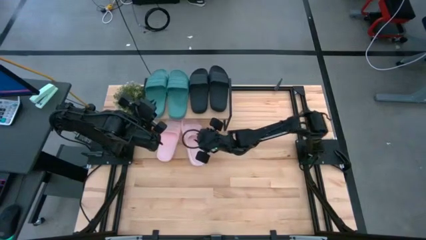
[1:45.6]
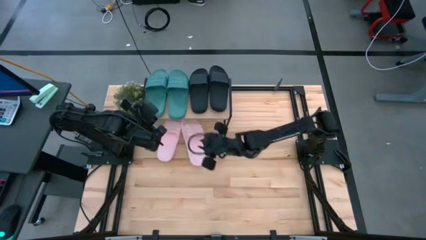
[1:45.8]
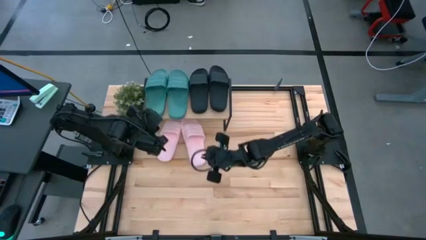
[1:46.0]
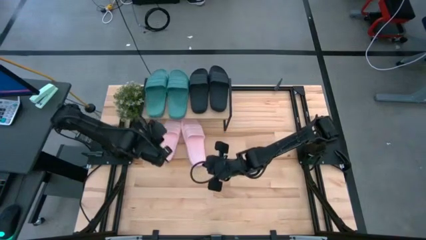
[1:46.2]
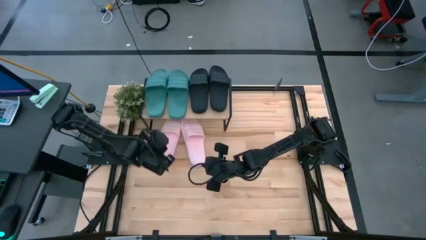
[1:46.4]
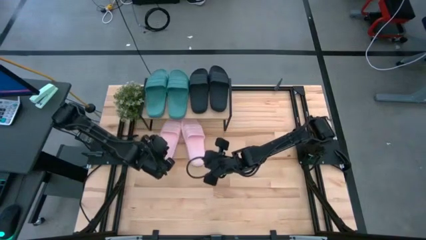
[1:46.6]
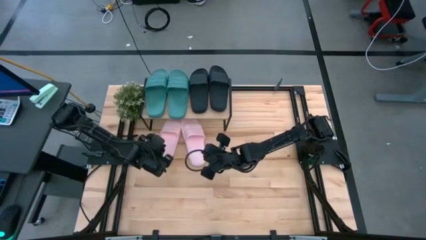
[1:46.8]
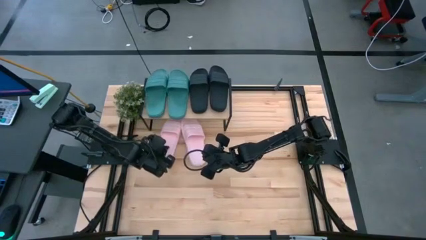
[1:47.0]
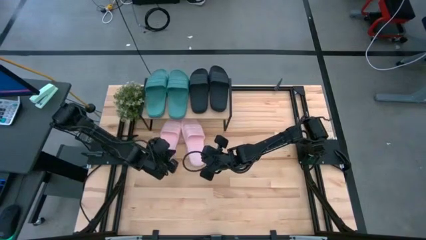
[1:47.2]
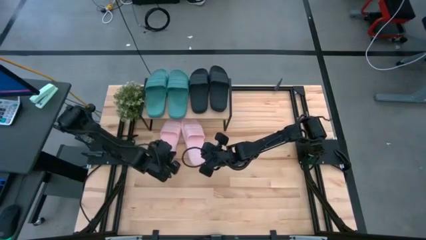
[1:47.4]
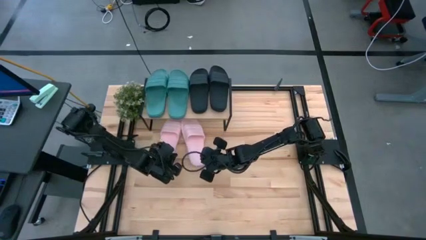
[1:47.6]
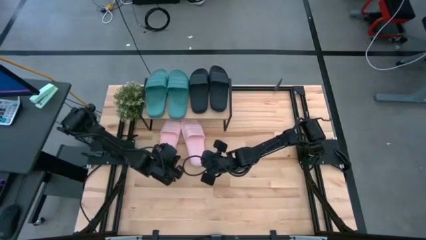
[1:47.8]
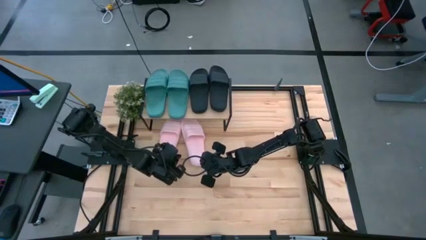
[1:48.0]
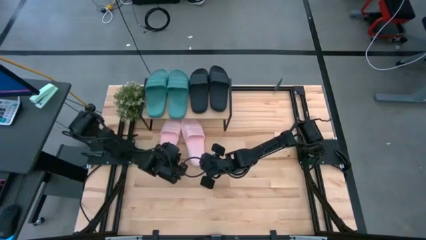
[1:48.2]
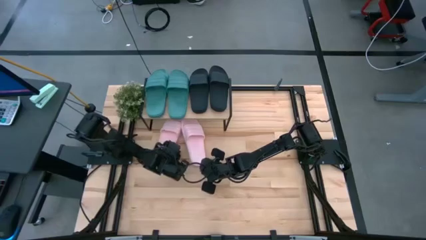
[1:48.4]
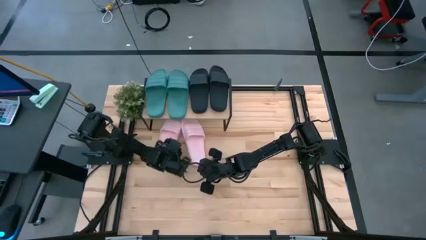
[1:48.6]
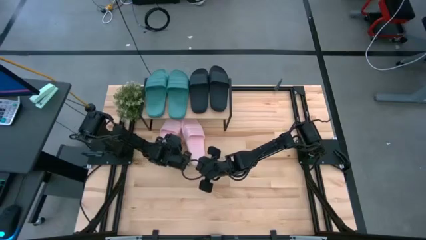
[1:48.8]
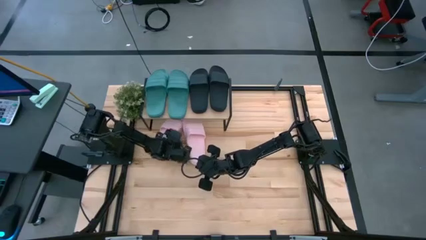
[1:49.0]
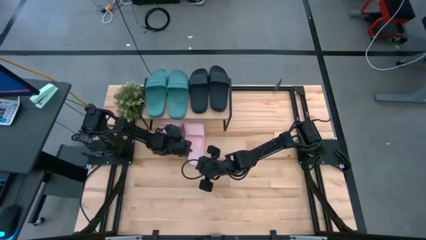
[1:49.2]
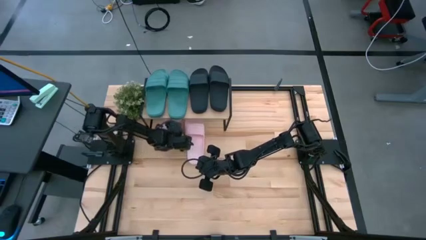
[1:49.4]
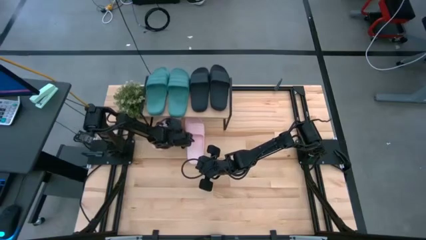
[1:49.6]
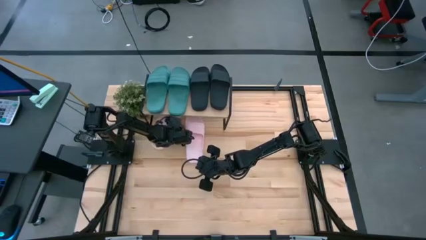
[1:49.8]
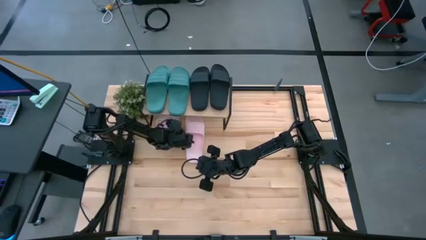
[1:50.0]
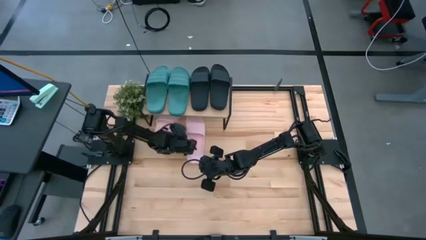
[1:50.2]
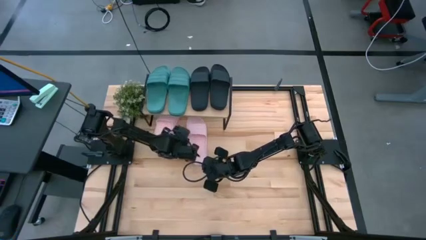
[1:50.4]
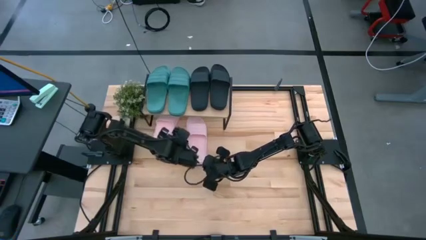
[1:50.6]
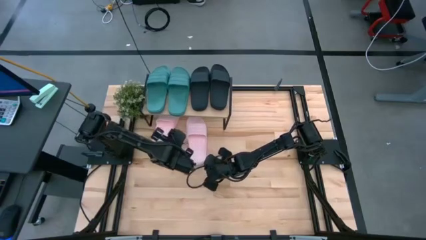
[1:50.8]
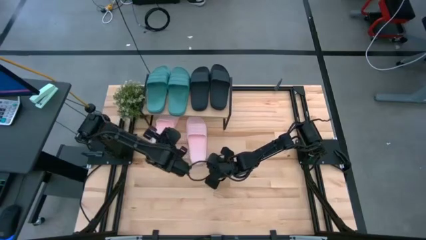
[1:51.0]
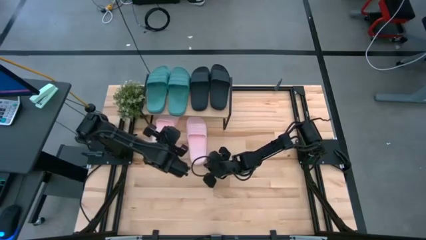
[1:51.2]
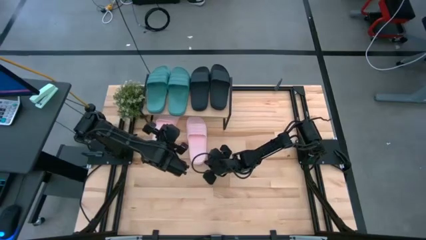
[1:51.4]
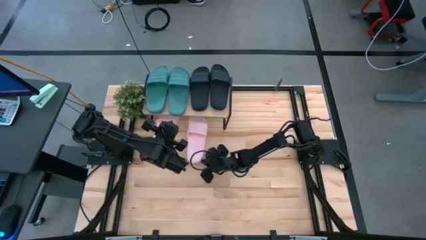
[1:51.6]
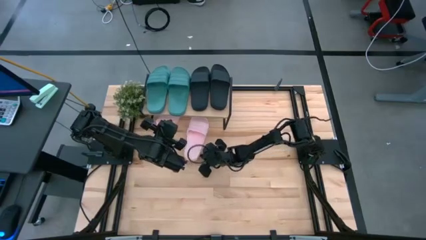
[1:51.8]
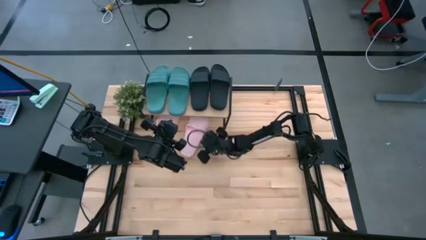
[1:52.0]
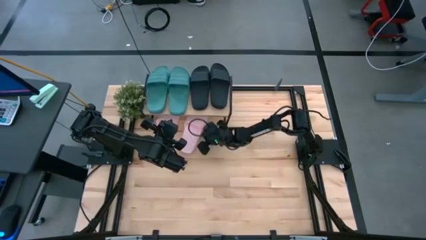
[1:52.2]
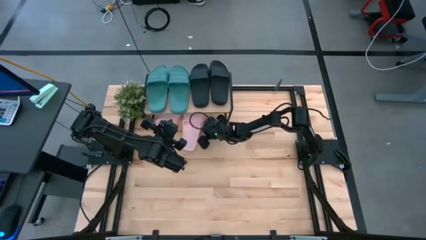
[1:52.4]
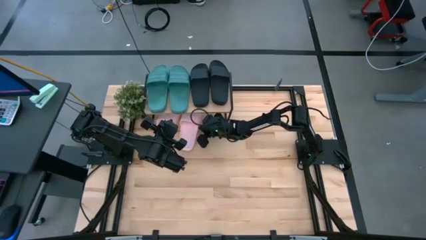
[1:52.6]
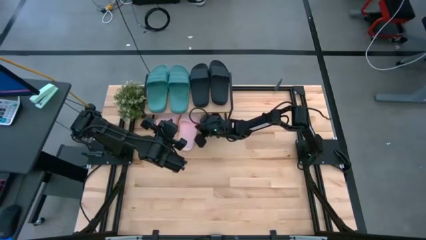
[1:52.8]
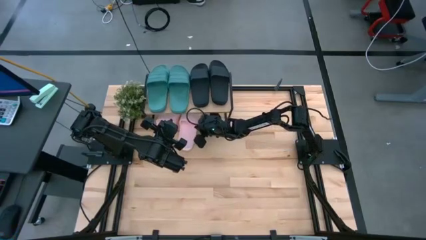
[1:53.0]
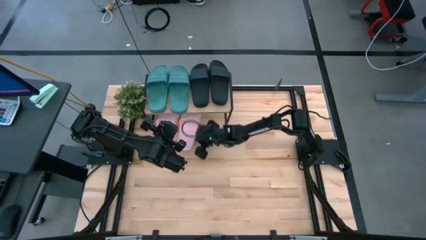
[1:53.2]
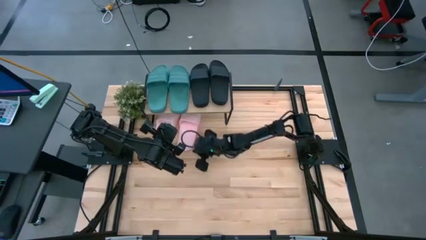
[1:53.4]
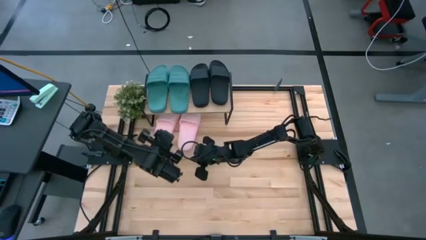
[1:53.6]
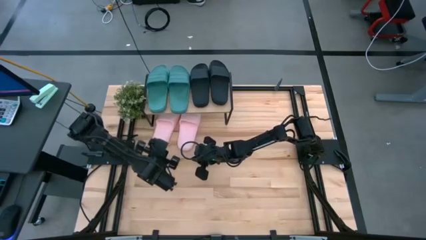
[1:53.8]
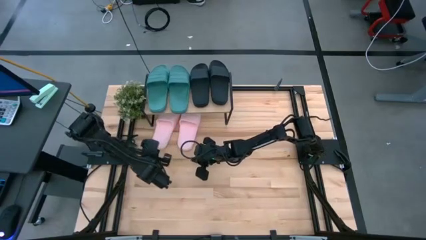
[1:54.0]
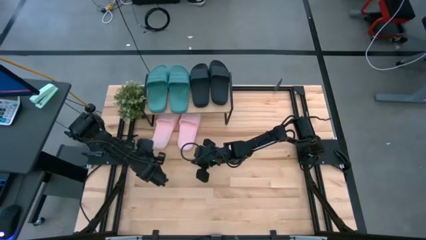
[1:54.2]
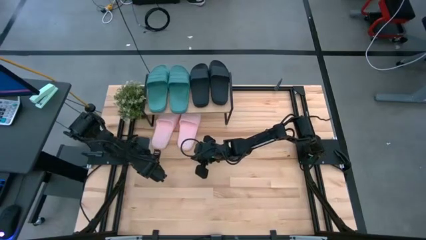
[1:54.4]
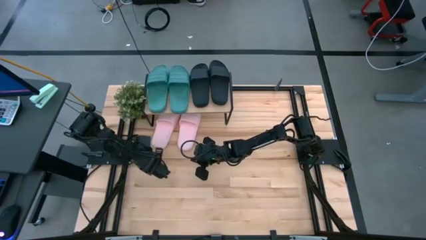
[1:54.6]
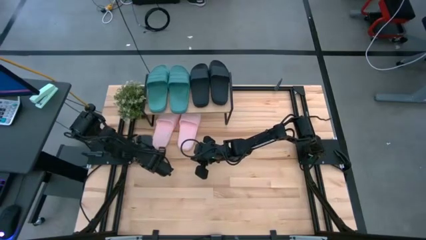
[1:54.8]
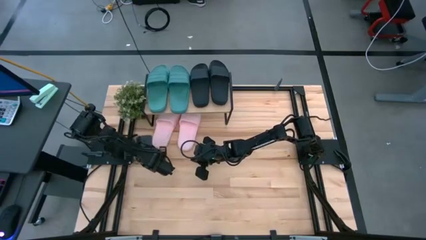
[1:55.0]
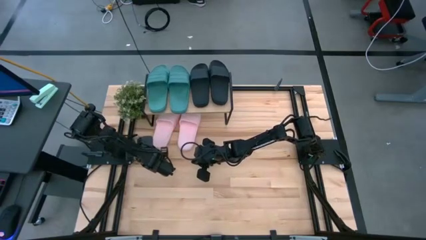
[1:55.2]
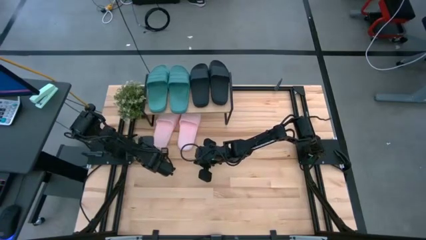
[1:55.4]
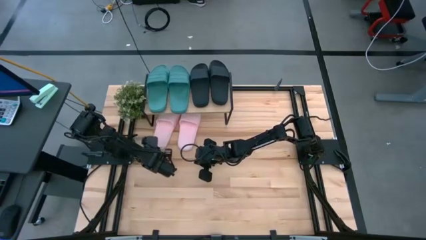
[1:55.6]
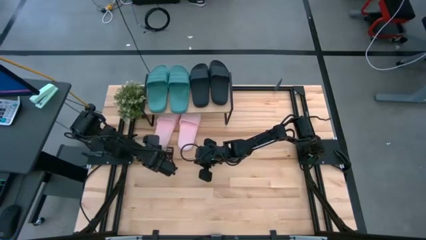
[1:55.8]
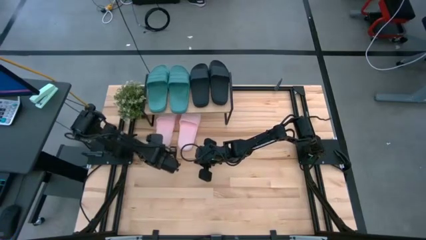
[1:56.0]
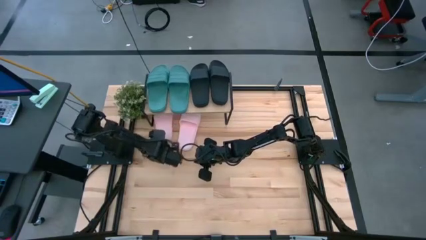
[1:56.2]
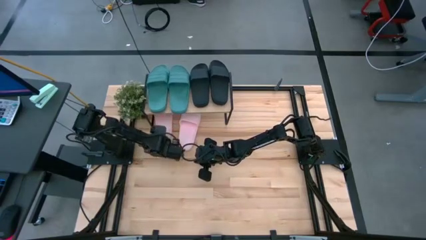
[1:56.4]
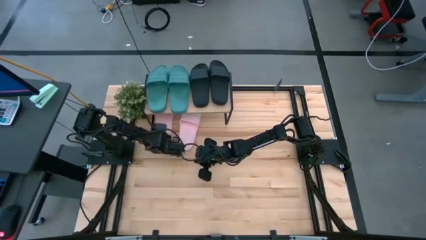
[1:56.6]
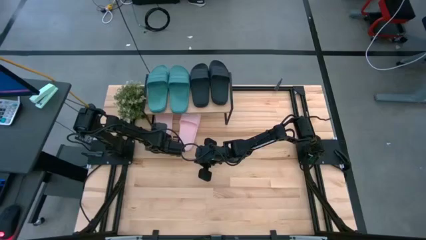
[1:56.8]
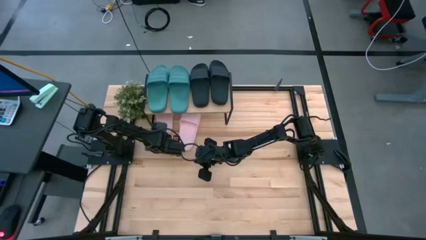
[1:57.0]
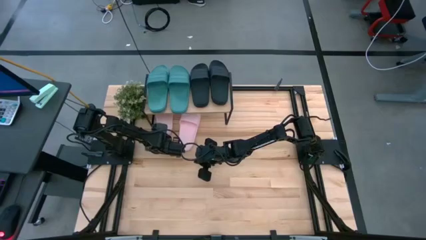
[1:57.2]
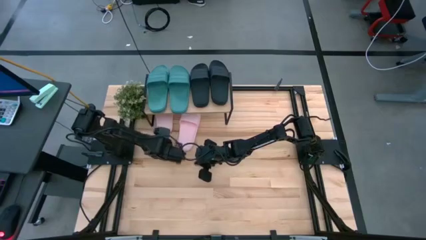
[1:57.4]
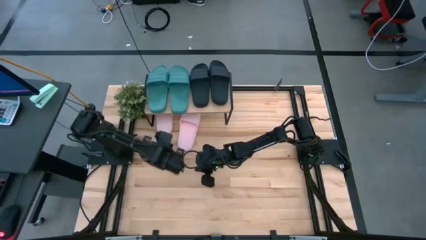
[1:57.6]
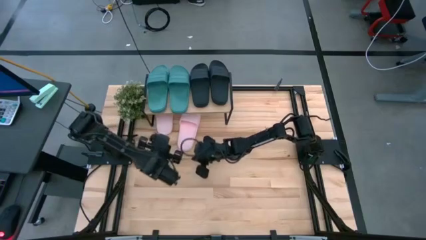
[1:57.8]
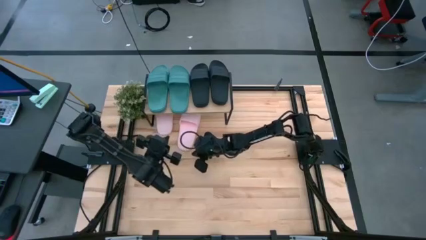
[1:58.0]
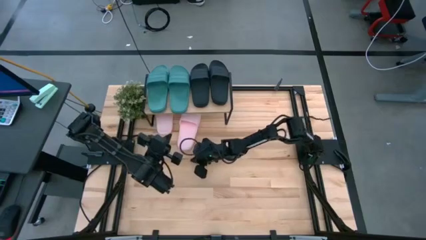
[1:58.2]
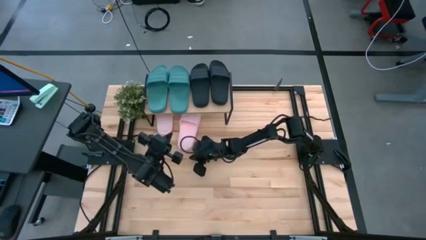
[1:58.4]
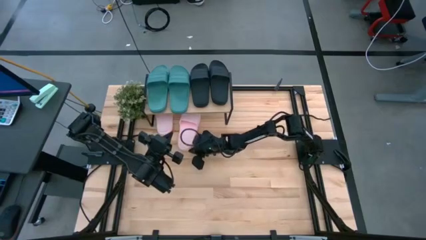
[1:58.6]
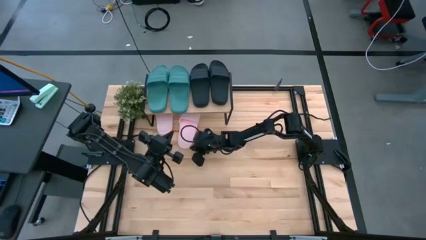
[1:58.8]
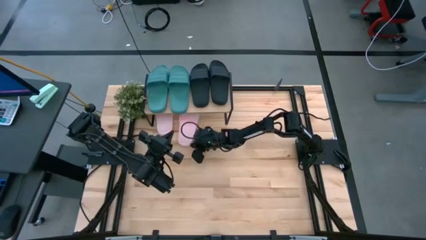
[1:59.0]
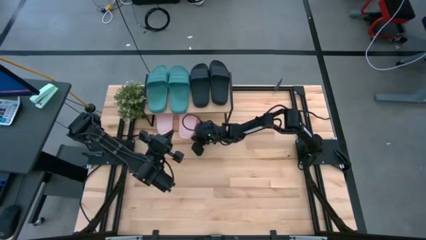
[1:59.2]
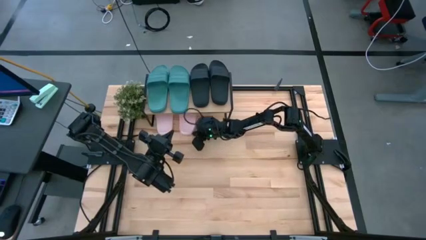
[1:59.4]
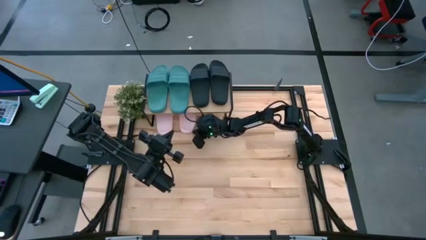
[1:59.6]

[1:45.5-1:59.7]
Task: Pick and place slides into the shelf
Adjust the pink slides under the shelf

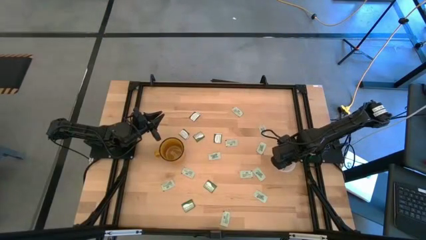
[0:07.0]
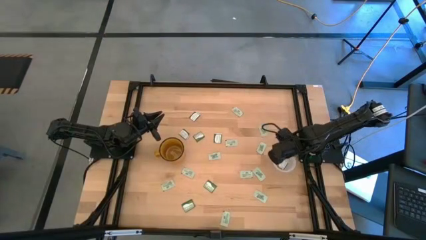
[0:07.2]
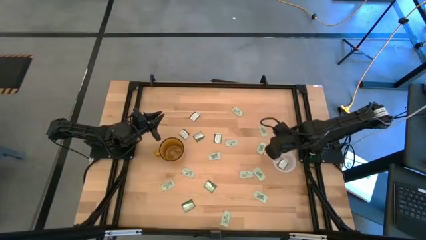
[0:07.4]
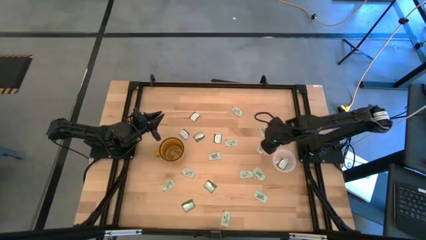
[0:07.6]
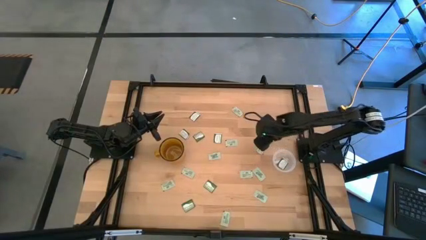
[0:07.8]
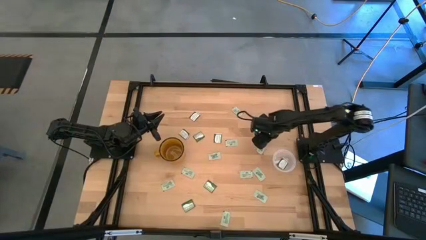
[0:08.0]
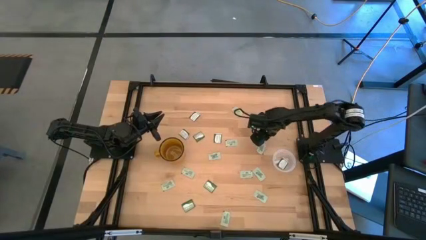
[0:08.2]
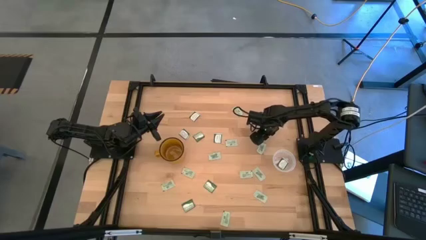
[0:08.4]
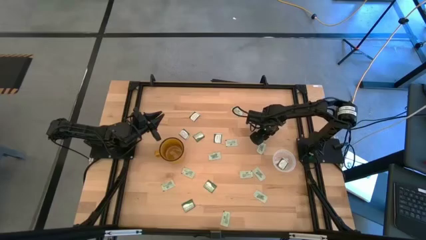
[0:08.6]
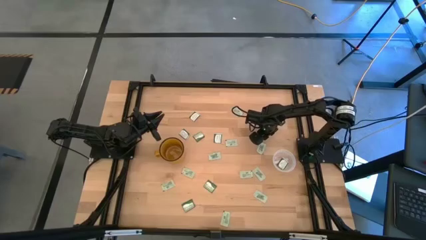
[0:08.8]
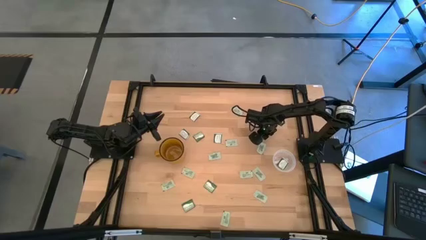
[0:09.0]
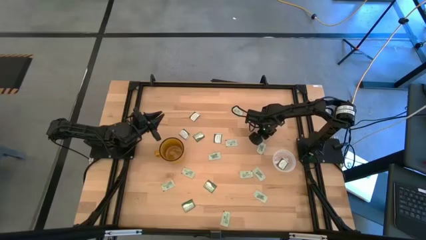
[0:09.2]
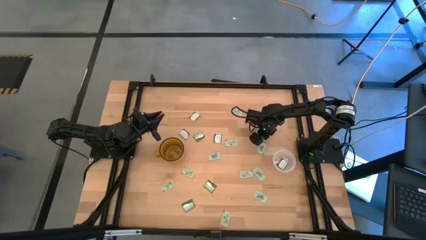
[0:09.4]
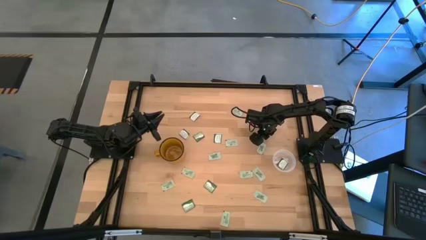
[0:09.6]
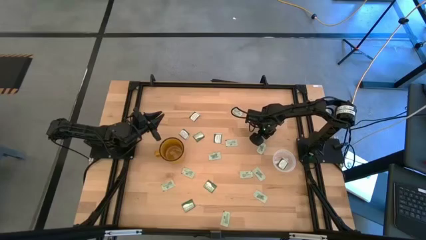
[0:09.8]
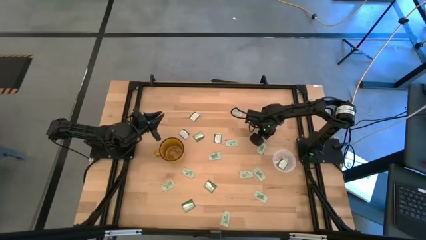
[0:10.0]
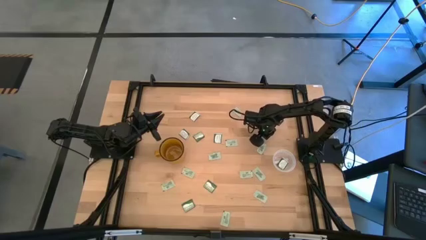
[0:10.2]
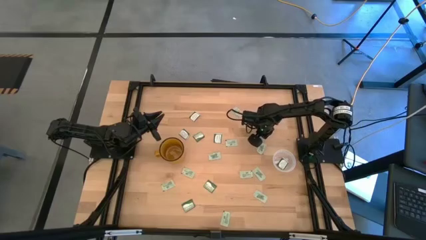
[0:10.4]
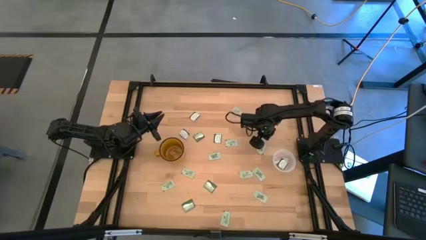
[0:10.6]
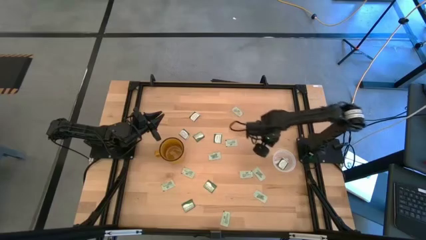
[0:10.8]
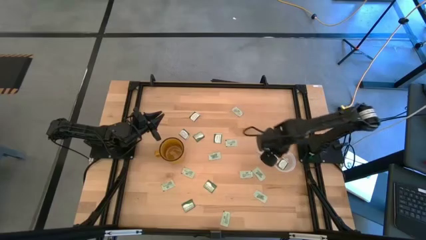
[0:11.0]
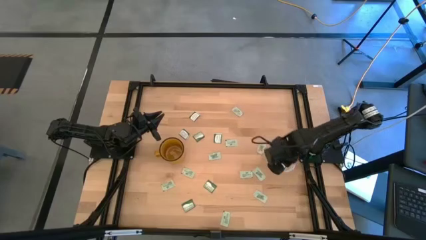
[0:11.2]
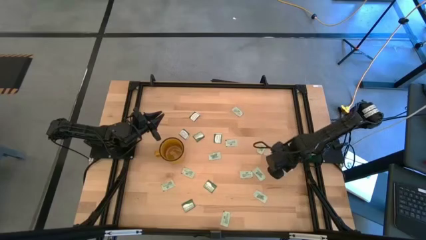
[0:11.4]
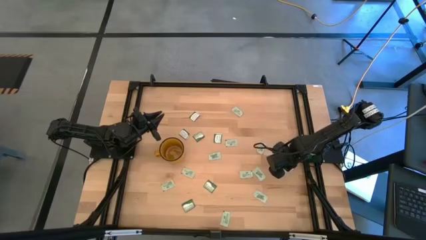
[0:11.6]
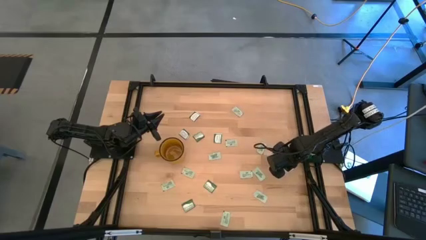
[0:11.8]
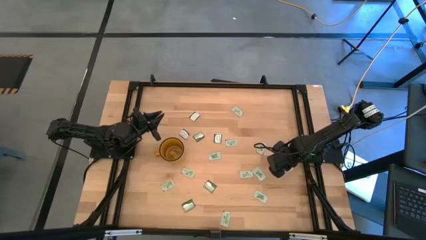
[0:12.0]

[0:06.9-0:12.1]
Task: Pick and place Stevia / Truvia into bins
Put the green stevia packet into the transparent container
